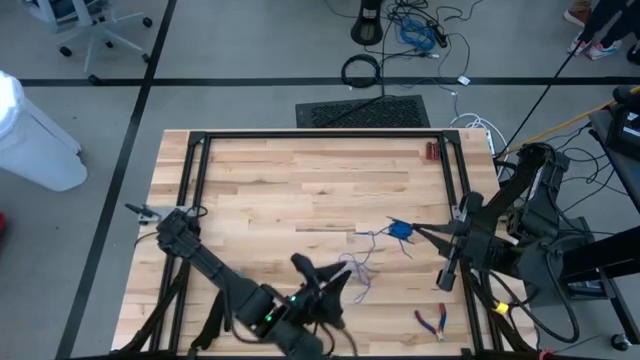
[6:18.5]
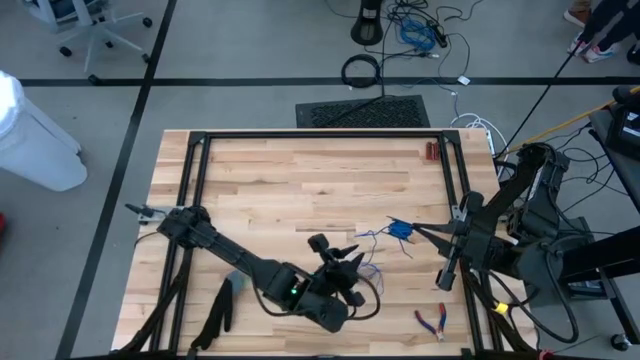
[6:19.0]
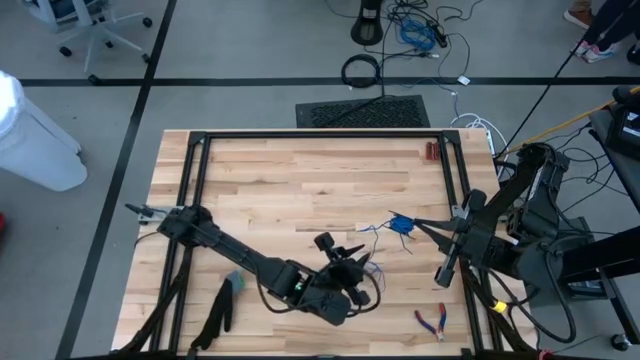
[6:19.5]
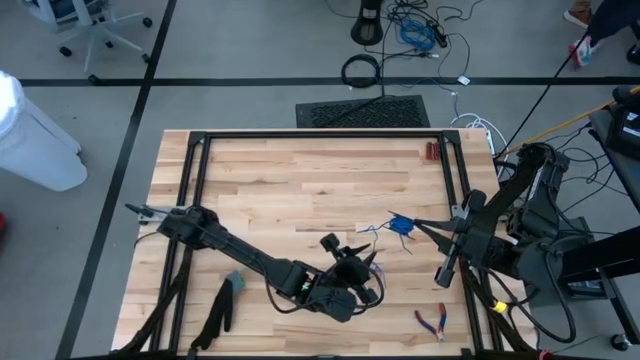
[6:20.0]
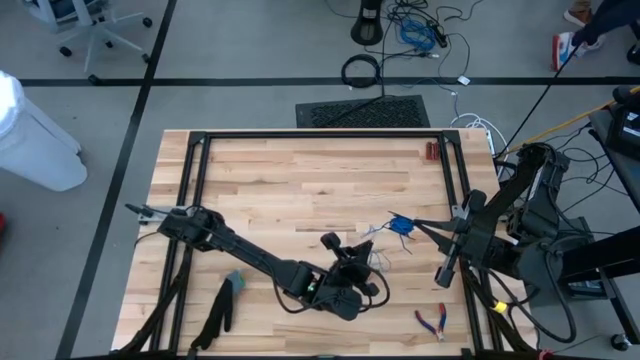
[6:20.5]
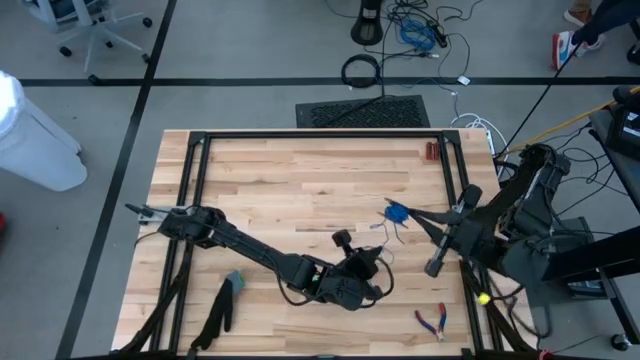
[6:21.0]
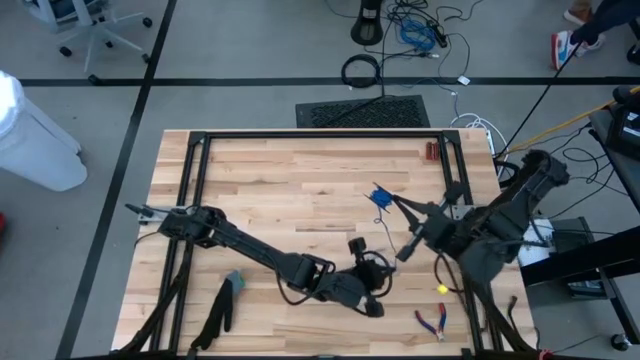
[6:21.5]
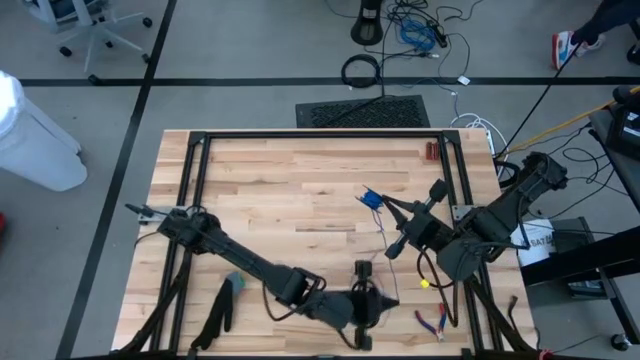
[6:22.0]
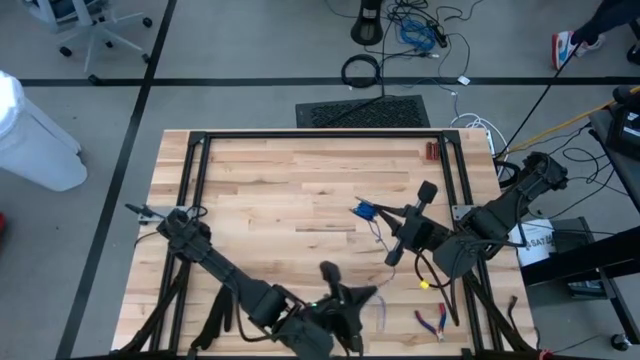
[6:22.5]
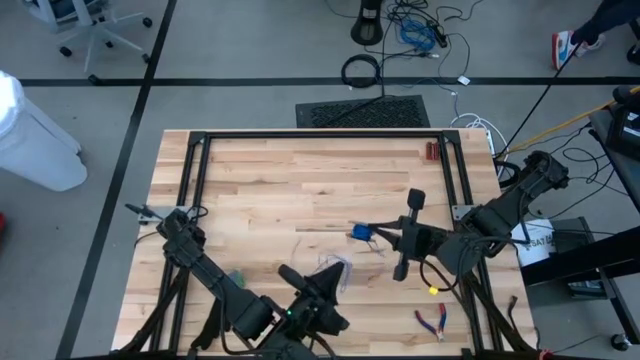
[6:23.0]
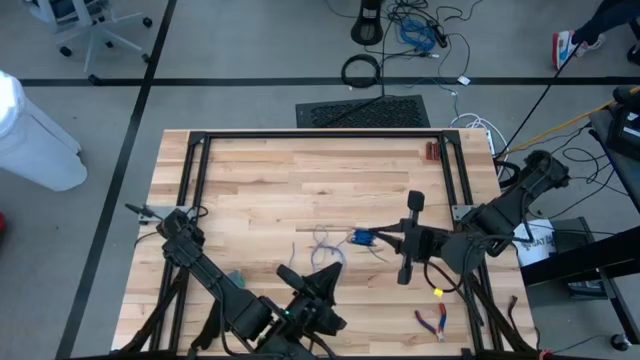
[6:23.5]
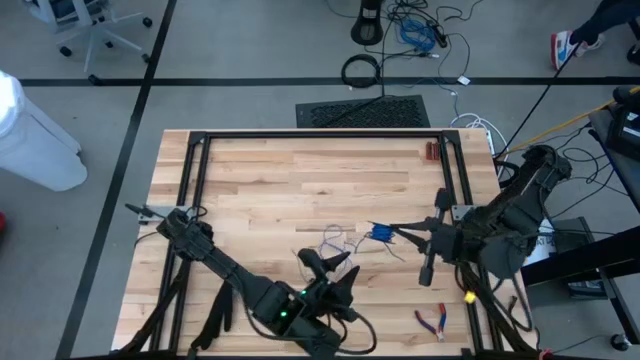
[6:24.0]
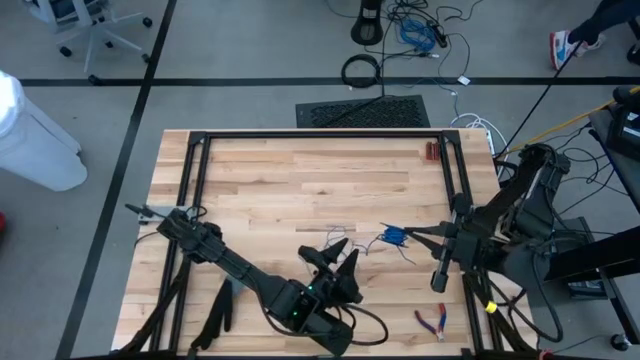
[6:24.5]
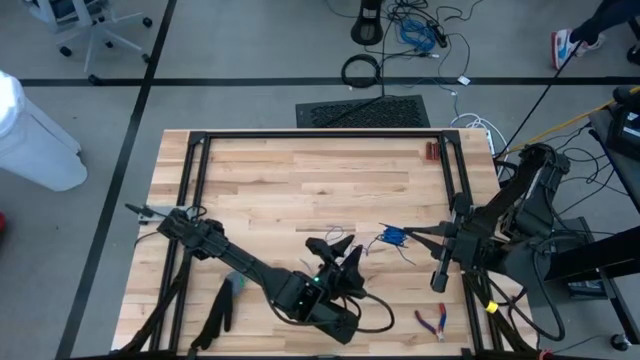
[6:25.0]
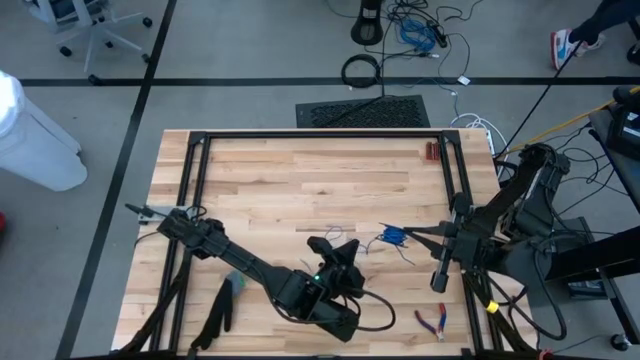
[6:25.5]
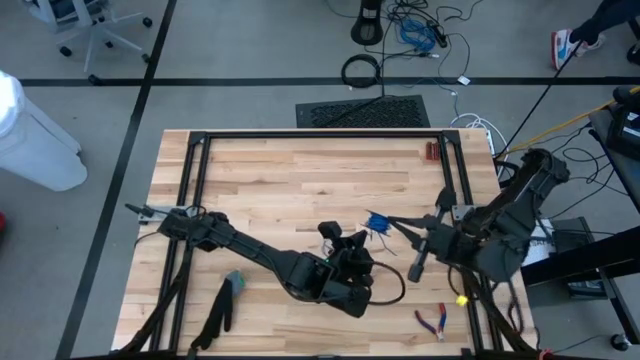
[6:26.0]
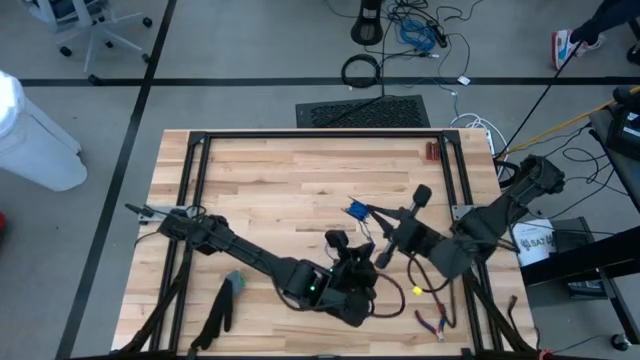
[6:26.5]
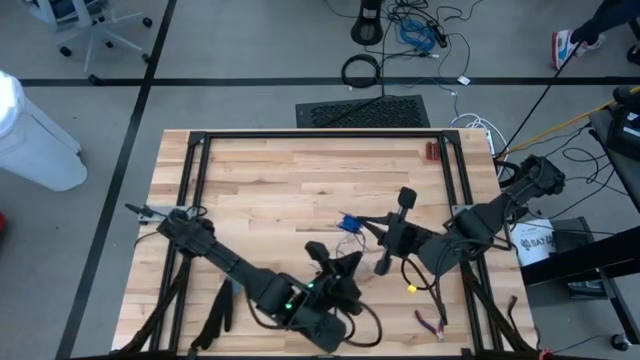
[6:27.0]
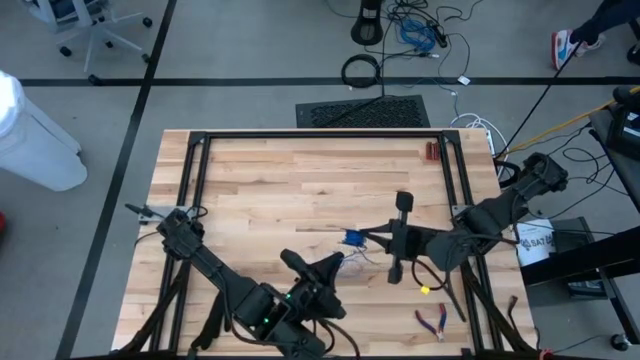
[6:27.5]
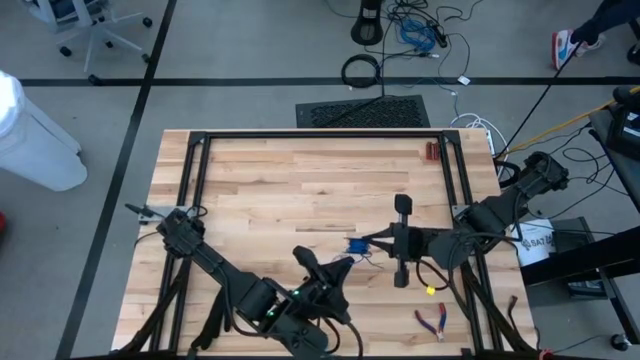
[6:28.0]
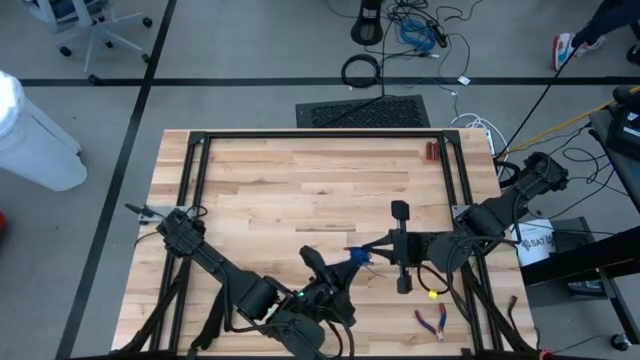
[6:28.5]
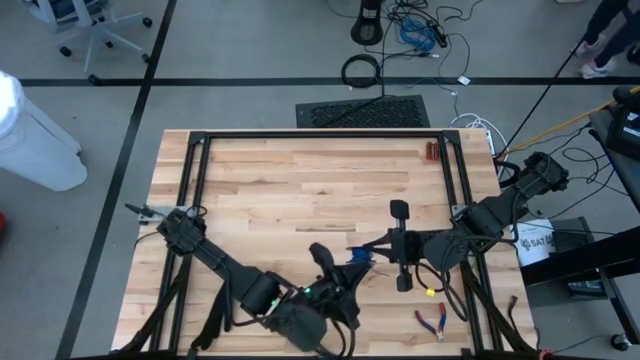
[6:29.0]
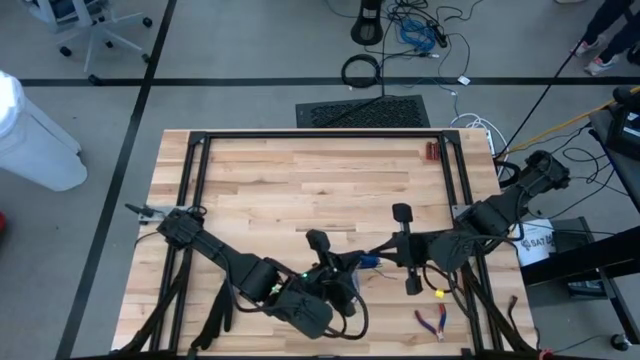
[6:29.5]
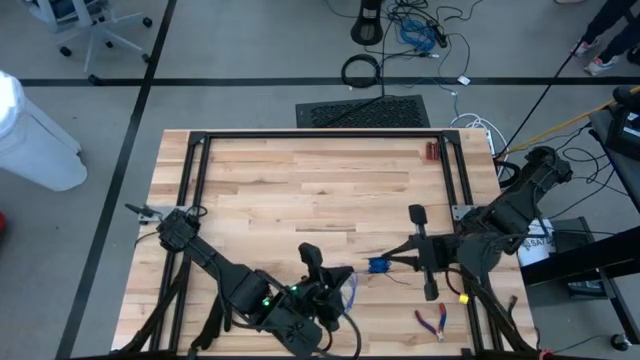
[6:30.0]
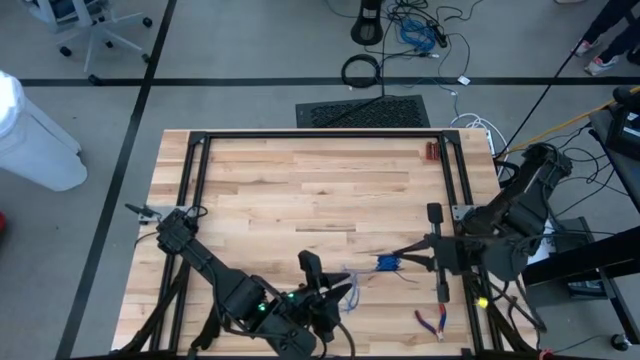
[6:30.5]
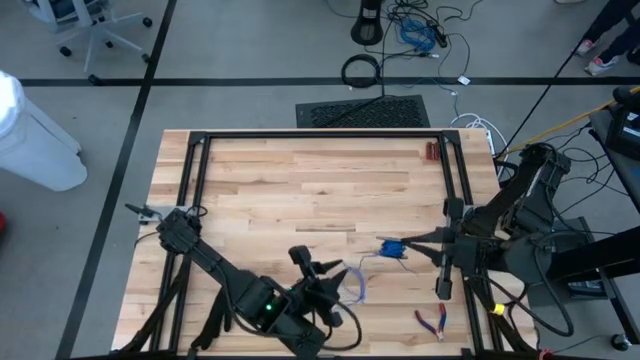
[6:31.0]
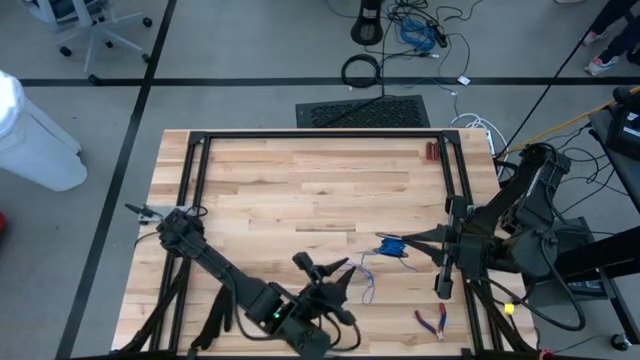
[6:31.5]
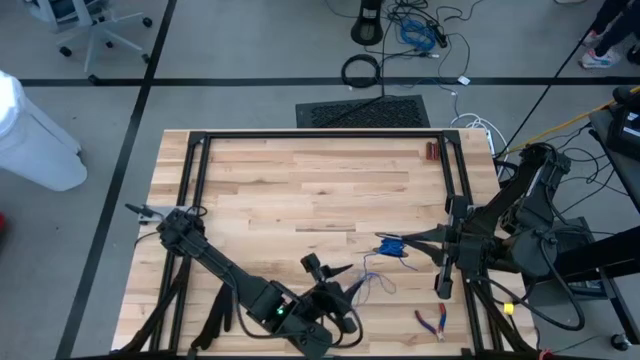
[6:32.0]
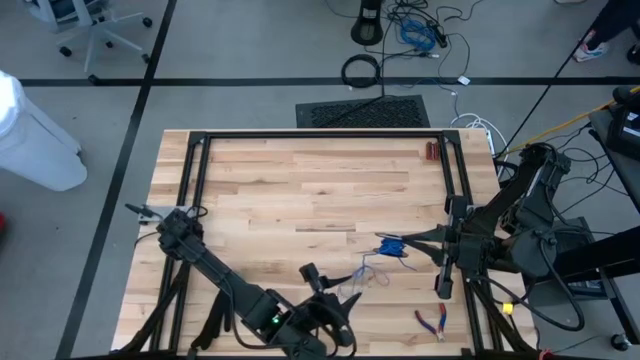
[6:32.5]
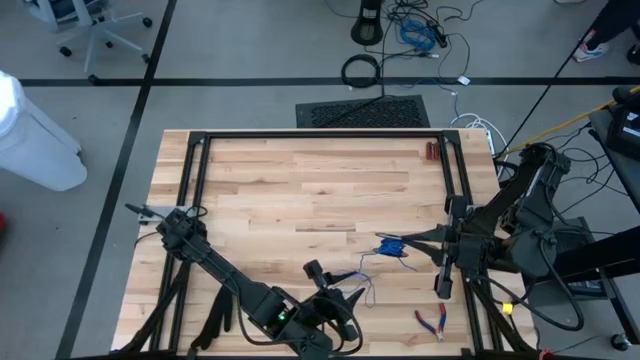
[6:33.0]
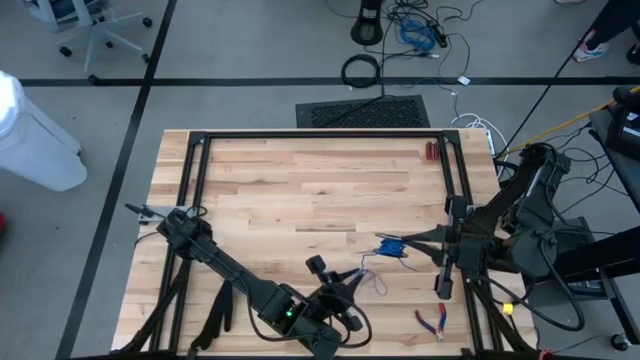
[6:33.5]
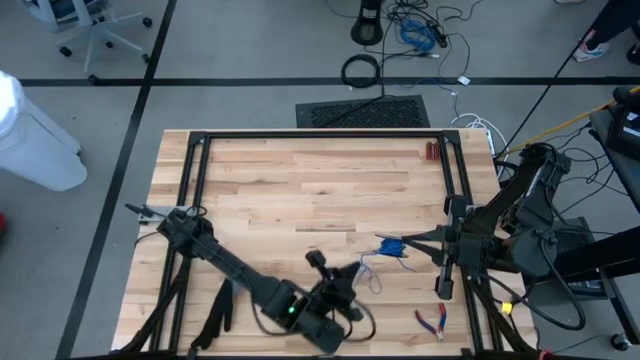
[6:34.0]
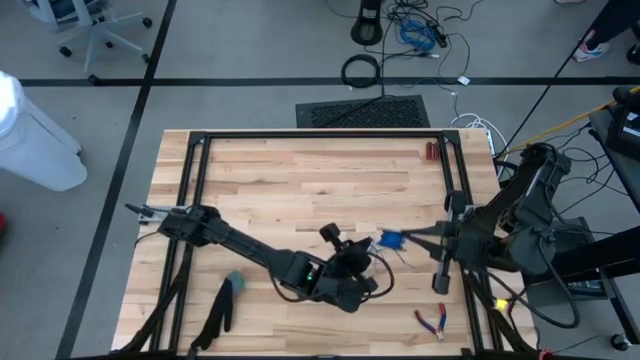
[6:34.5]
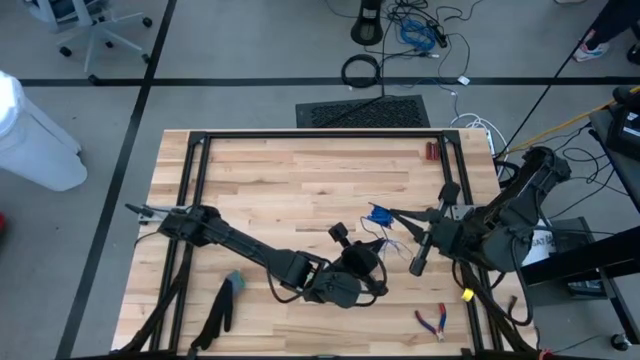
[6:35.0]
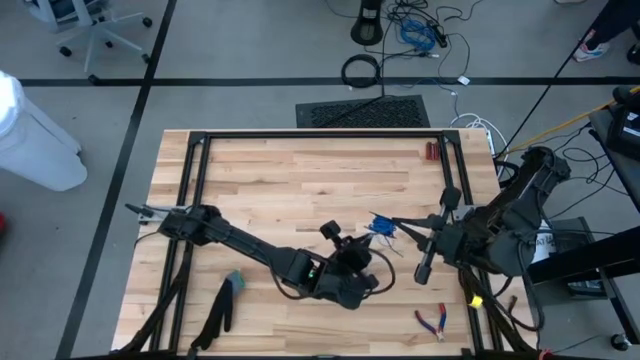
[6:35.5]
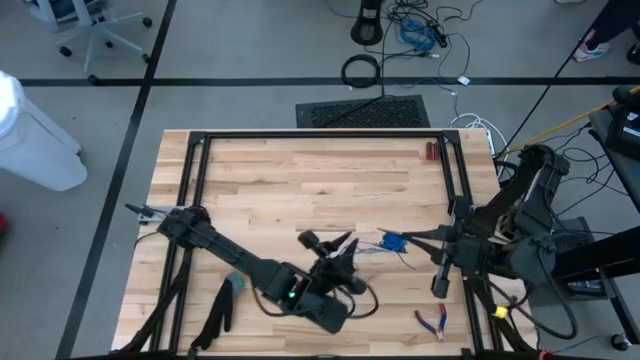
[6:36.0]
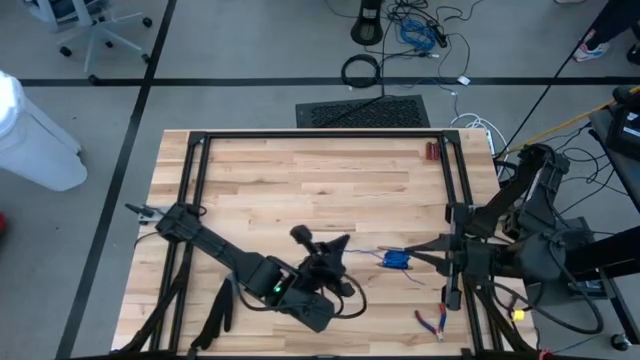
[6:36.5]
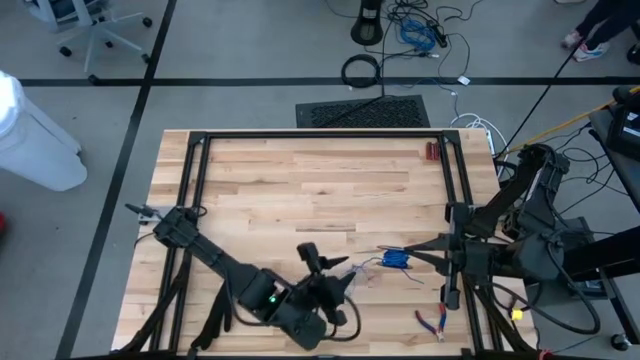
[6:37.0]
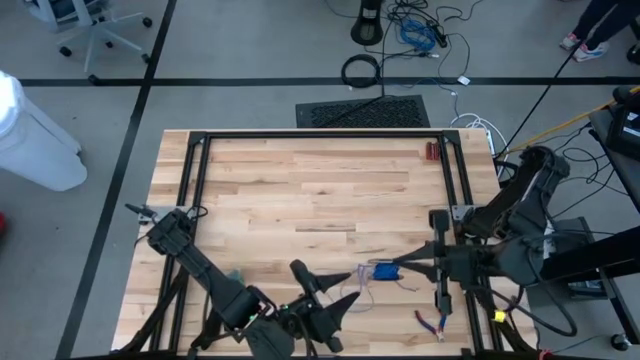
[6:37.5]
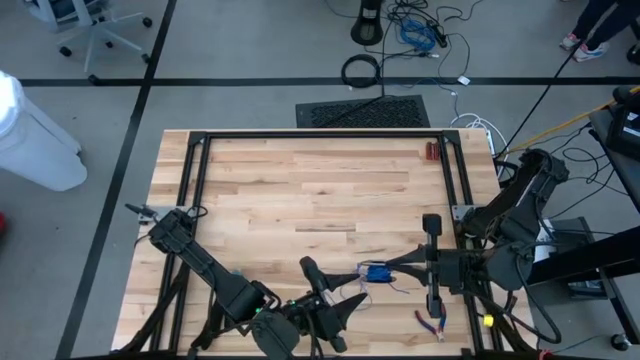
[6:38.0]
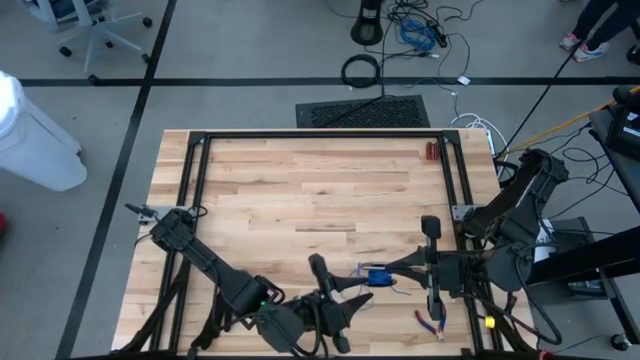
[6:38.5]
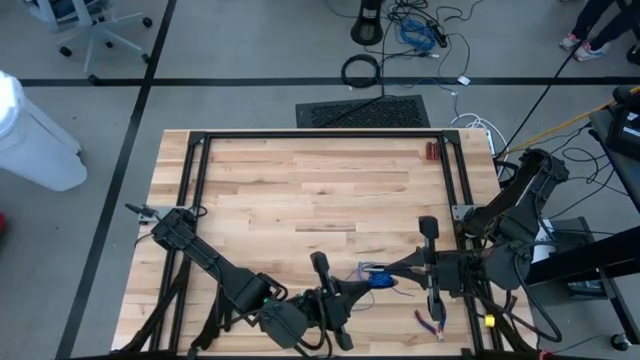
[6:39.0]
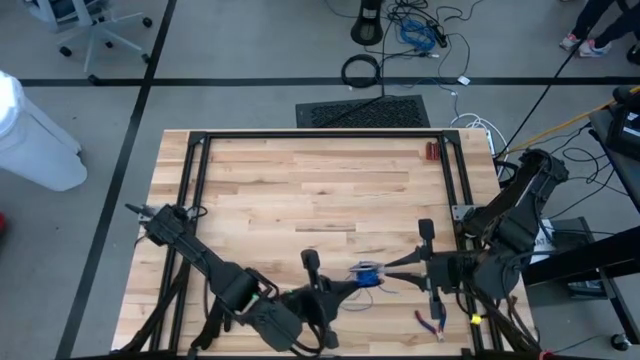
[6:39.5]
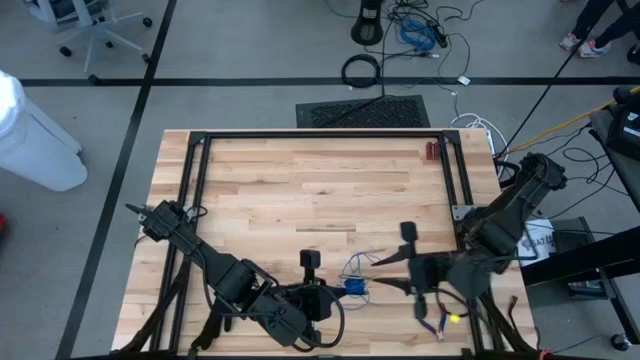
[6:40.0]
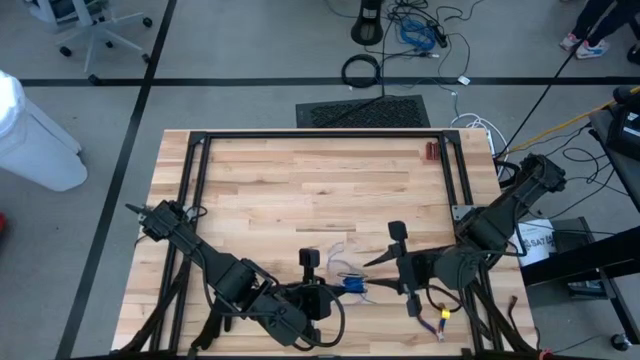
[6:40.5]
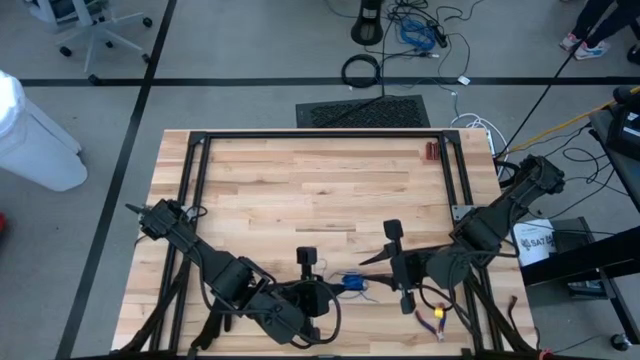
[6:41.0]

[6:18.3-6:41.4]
Task: Coil cords
Coil the blue wire onto the black spool
